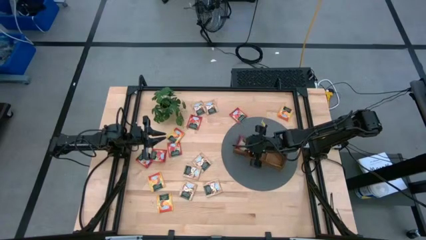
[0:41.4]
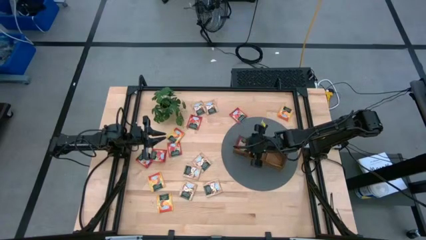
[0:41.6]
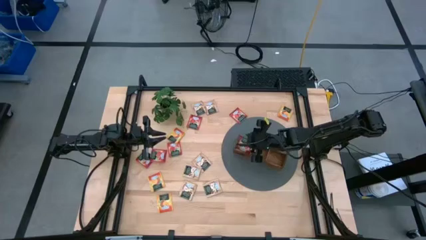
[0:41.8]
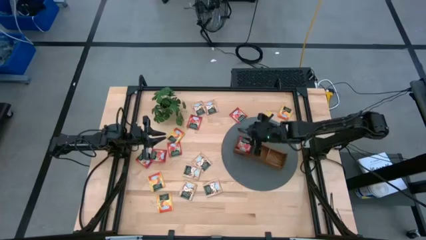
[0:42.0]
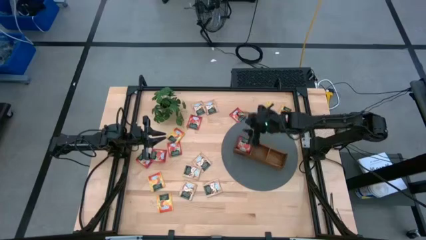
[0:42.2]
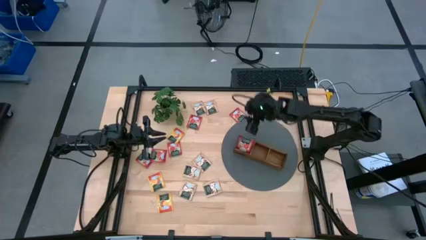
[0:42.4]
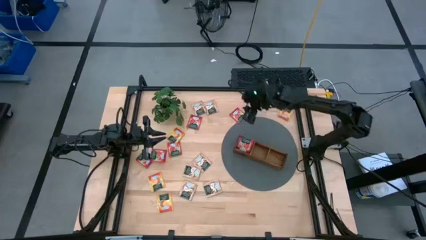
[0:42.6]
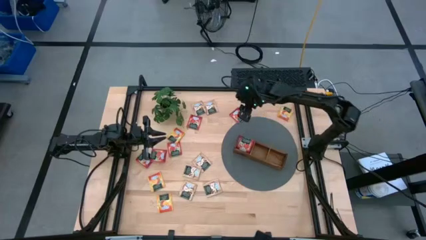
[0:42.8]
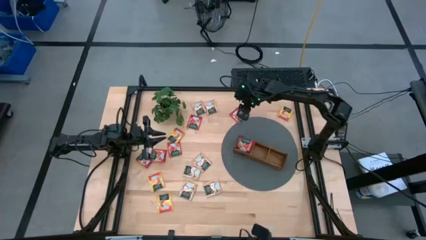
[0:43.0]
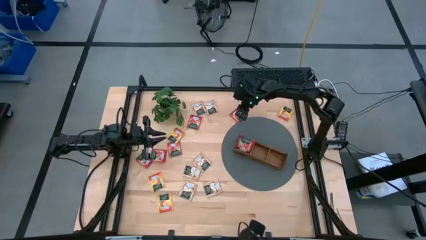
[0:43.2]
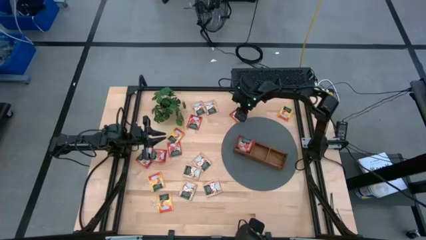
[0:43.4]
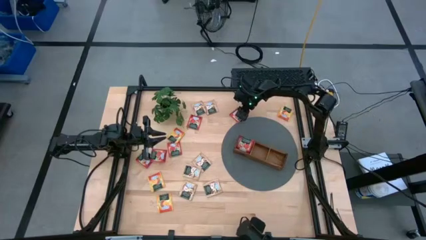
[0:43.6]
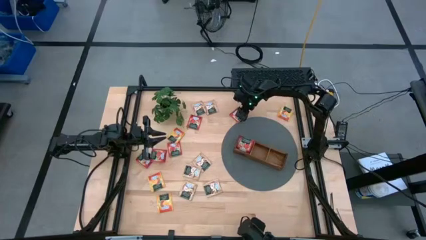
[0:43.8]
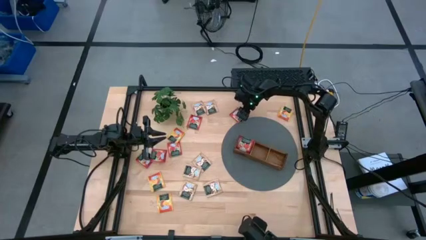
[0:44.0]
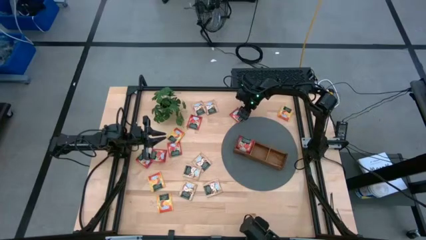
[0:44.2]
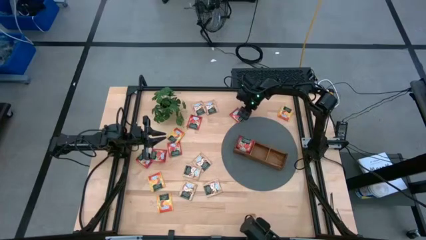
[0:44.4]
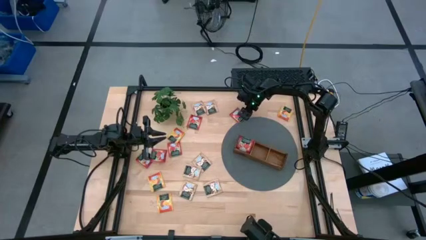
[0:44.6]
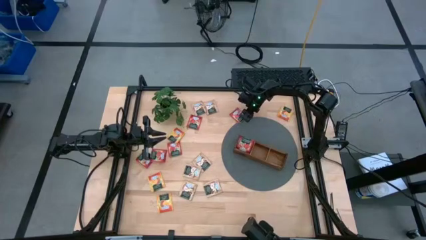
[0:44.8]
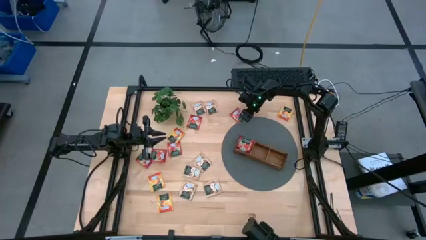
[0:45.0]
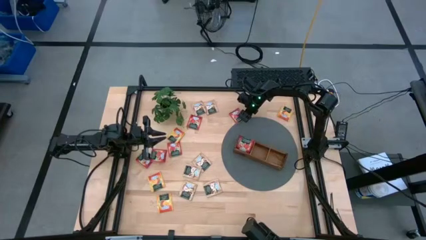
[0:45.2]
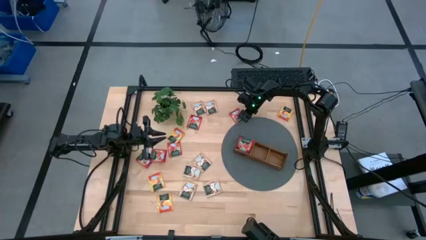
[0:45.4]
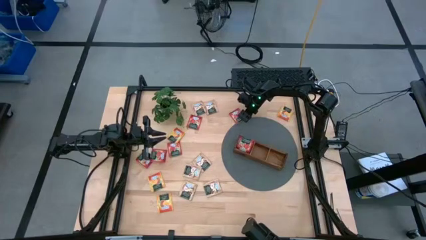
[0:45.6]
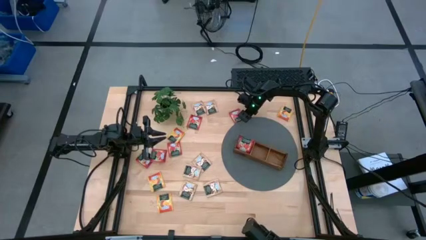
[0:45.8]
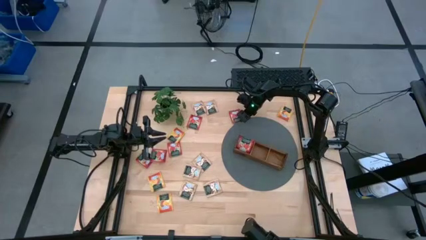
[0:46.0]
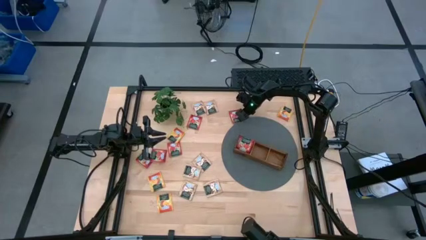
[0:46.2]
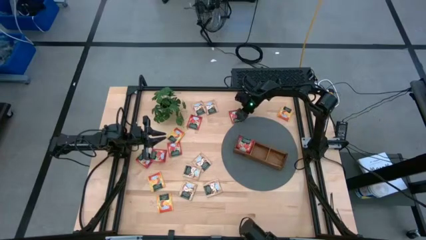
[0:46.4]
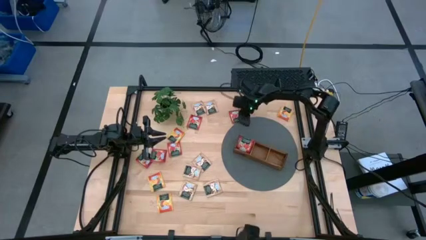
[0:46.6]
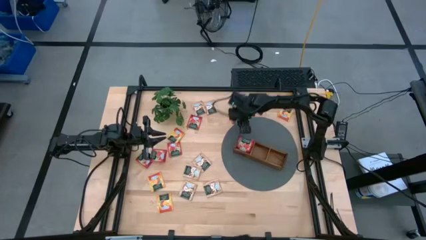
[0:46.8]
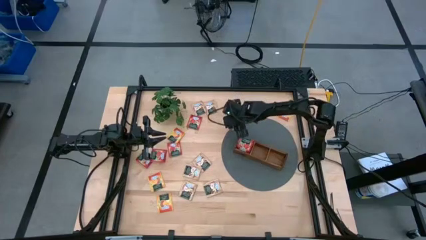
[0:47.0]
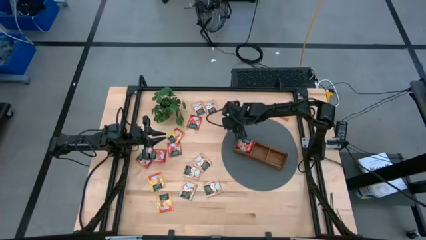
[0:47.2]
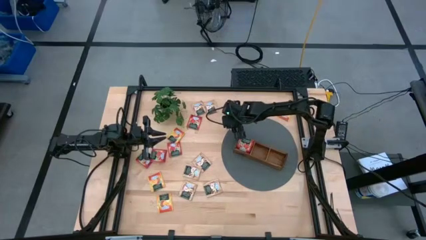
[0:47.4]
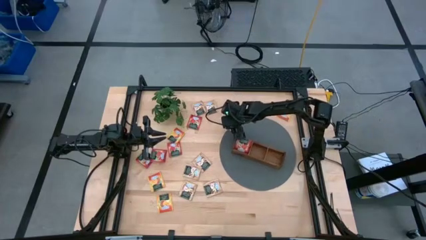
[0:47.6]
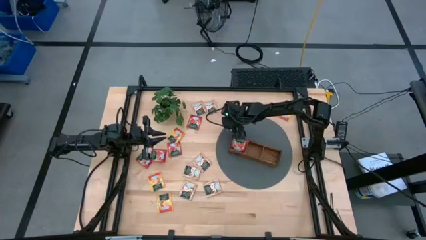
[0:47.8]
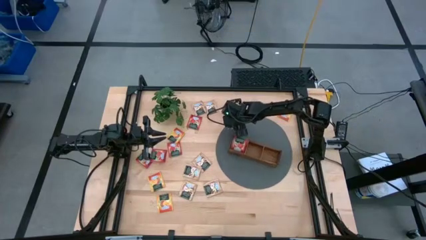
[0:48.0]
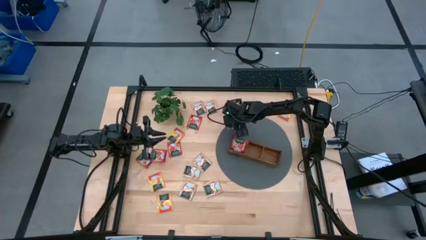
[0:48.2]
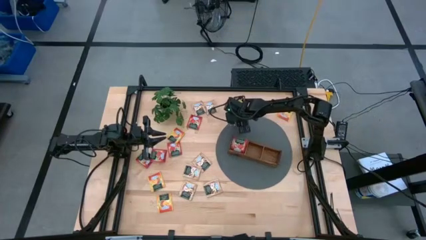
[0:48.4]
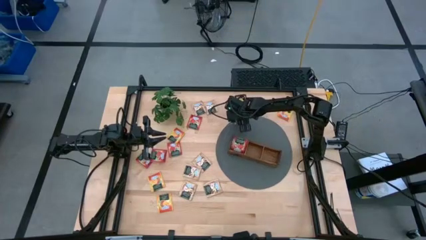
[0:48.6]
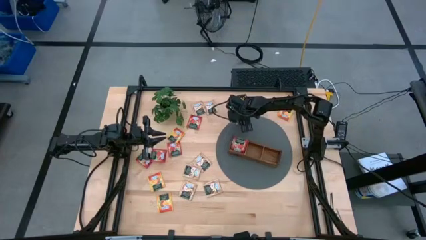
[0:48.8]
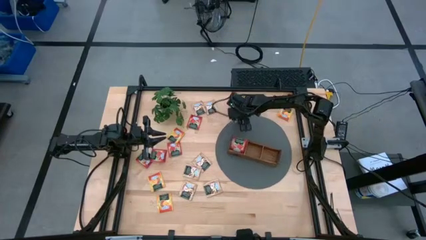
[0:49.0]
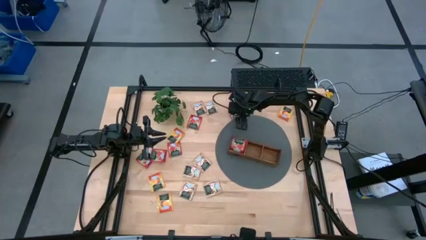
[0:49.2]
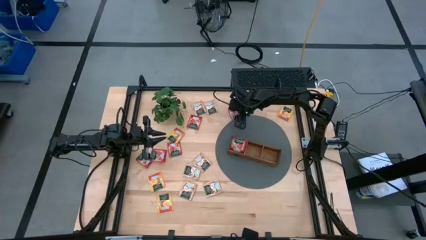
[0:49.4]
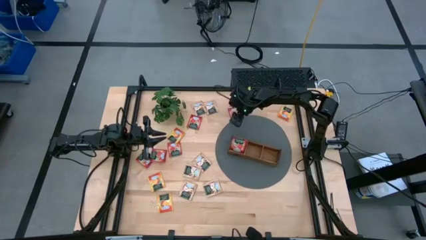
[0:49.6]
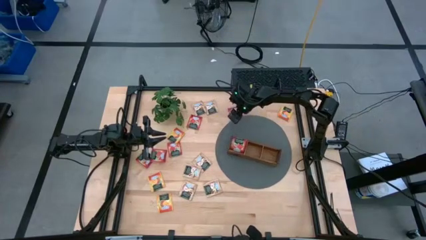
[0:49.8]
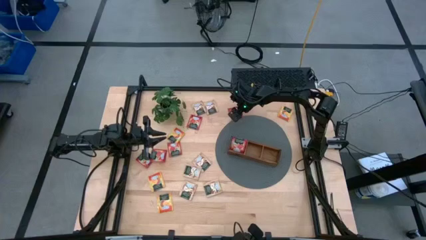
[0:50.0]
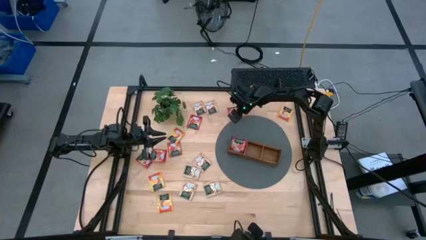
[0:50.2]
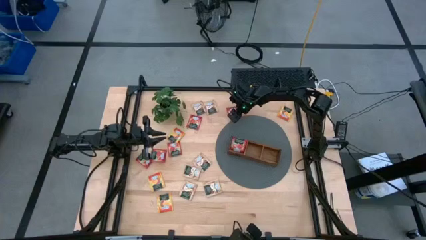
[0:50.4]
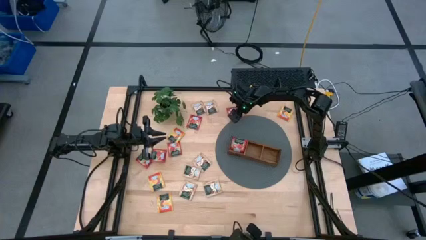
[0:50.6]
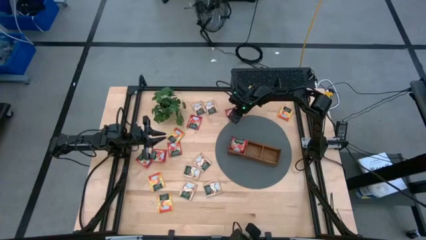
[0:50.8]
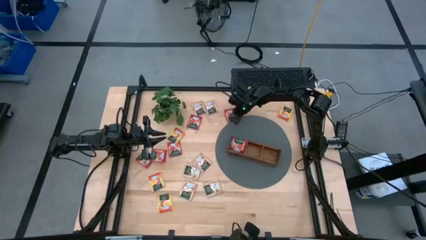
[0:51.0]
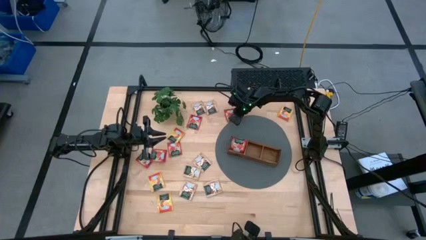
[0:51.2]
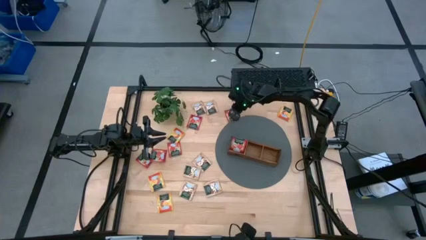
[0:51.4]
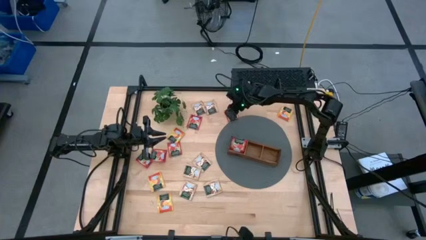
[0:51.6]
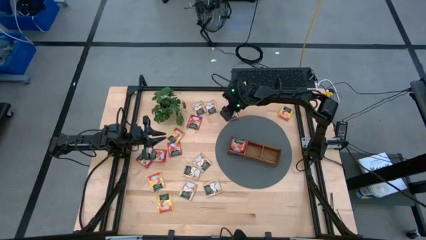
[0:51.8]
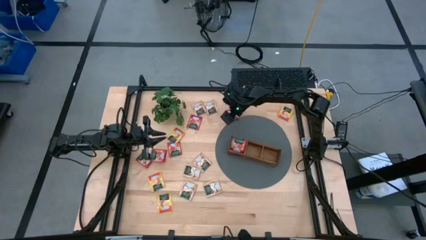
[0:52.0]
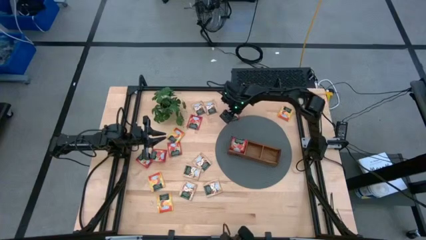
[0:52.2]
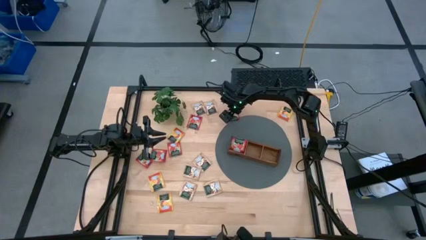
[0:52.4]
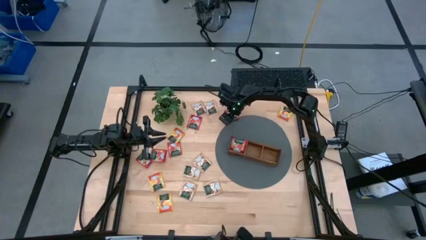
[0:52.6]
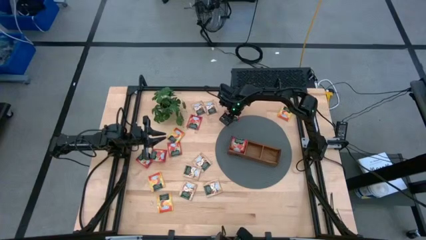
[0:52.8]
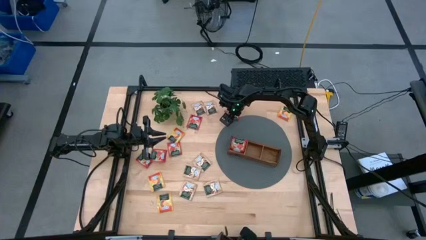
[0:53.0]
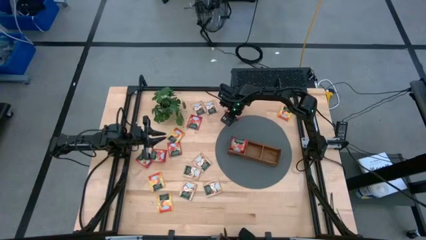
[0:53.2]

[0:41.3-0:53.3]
Task: Pick & Place Tea
Put the red tea bag into the left section of the wooden organizer

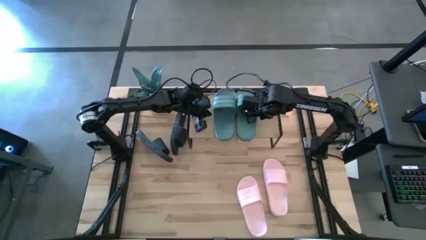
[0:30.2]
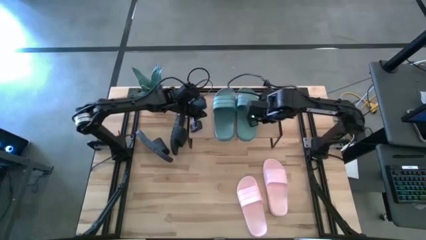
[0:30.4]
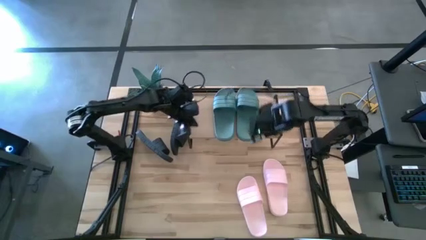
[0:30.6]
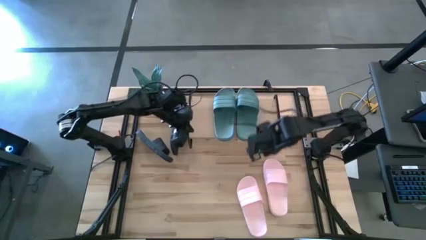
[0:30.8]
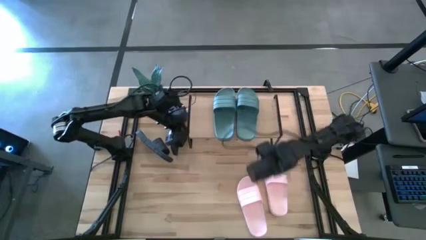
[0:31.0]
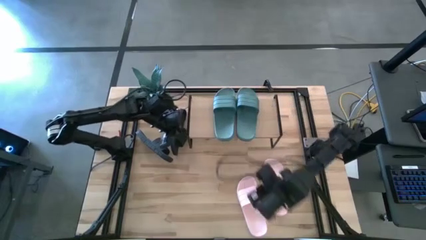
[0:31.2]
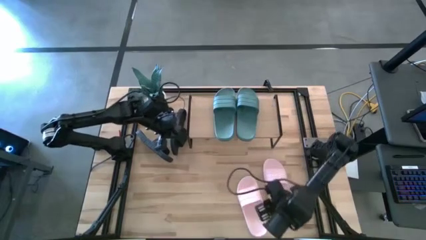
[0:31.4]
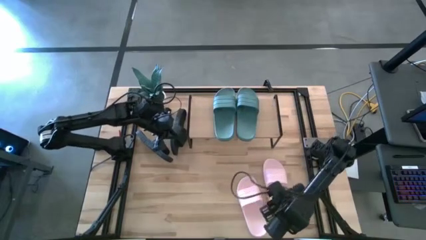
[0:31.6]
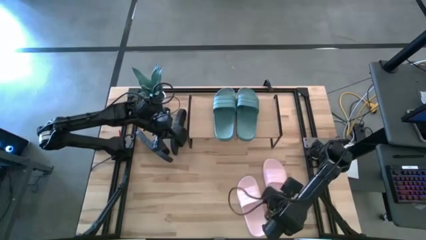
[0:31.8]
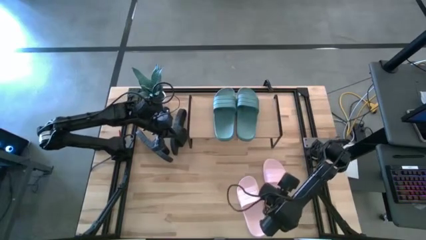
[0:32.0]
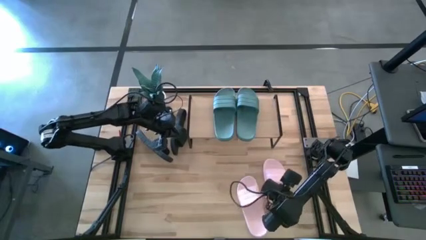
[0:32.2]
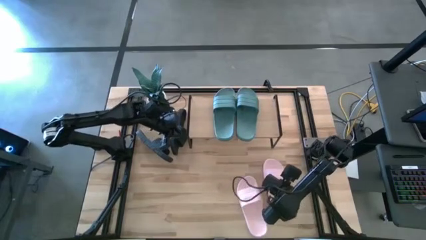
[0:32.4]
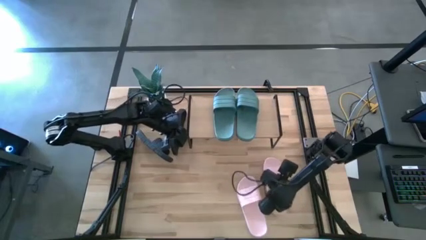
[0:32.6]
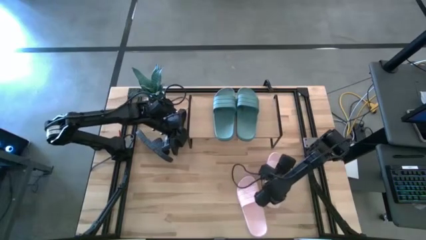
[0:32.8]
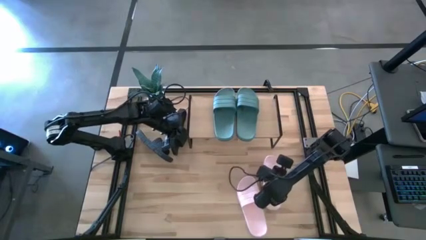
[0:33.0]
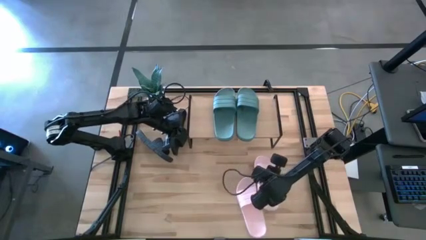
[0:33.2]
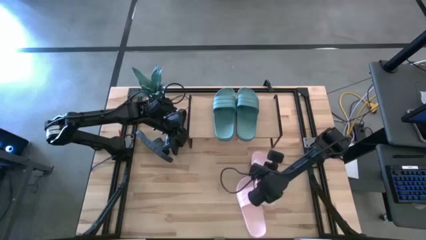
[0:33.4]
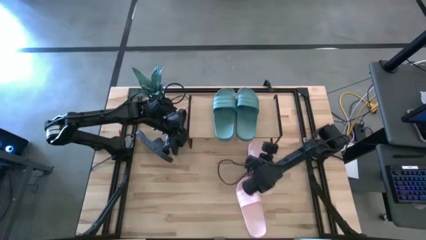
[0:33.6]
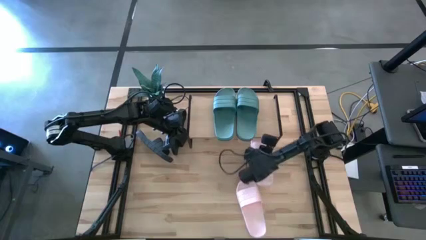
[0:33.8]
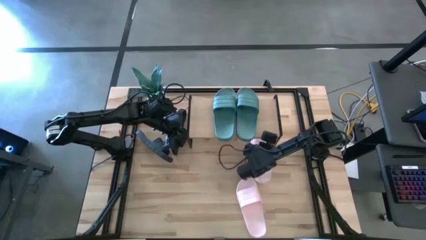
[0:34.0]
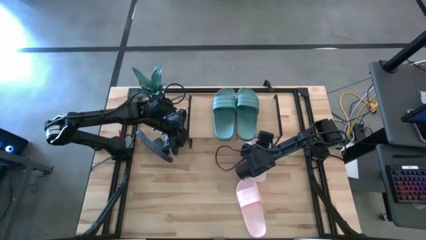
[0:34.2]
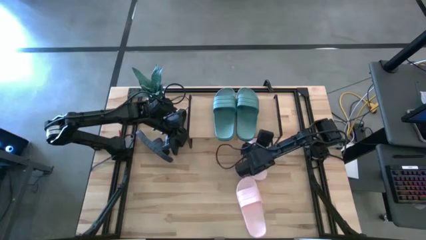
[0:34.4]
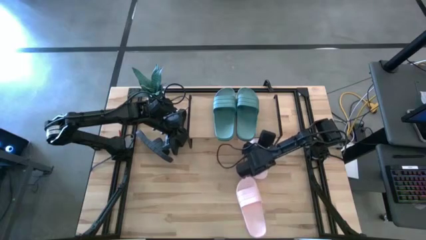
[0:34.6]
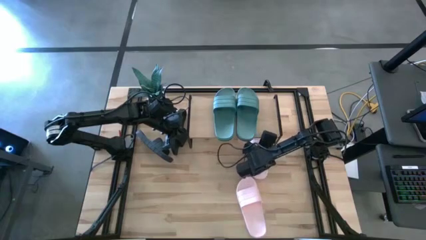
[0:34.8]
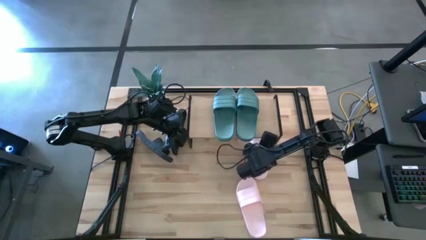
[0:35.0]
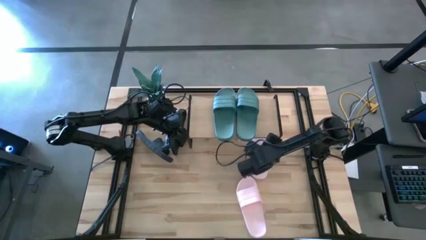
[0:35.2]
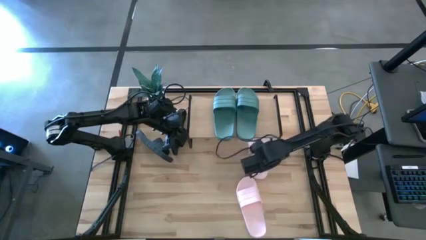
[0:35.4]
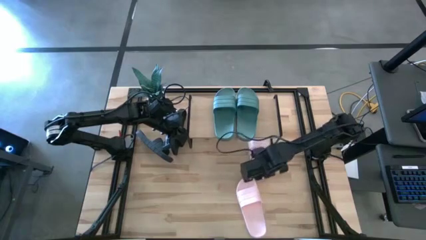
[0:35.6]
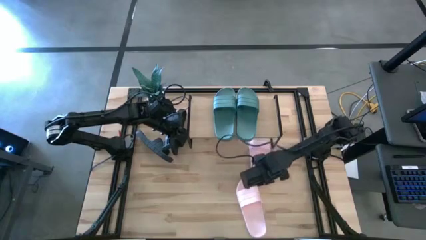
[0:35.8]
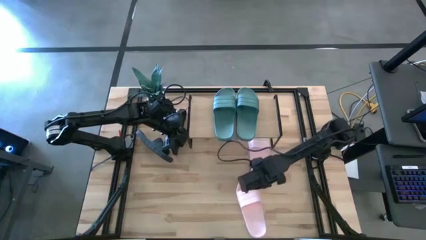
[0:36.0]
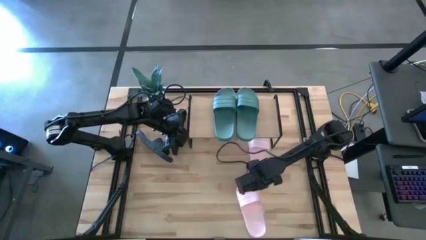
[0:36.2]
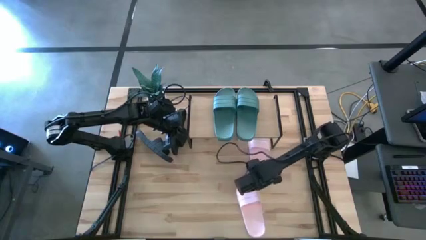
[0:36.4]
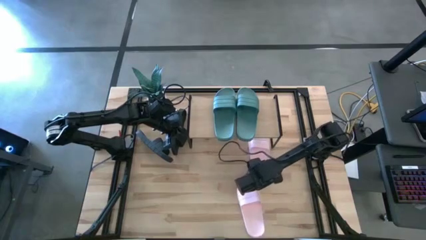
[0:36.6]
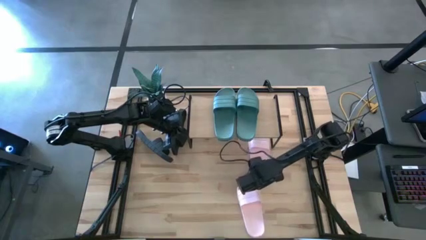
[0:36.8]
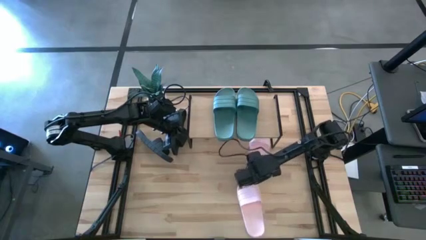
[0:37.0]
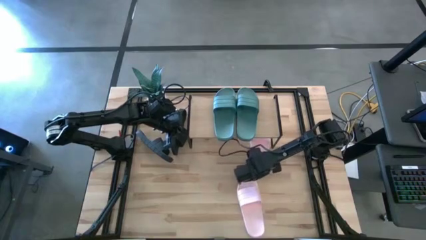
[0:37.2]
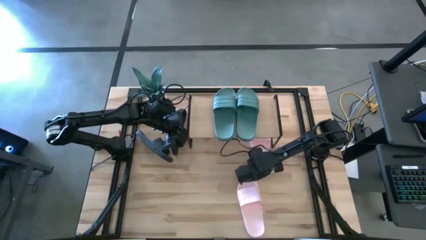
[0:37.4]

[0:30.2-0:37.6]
Task: Pick and place slides into the shelf
Put the right pink slipper under the shelf
